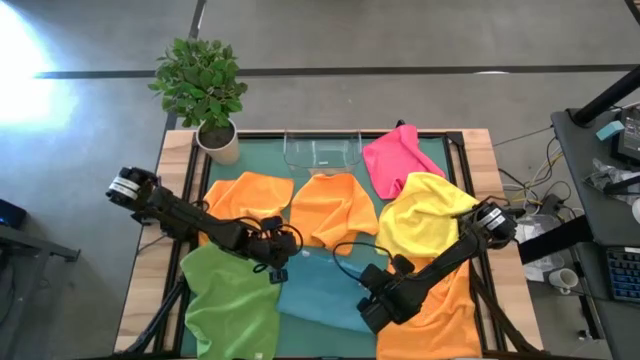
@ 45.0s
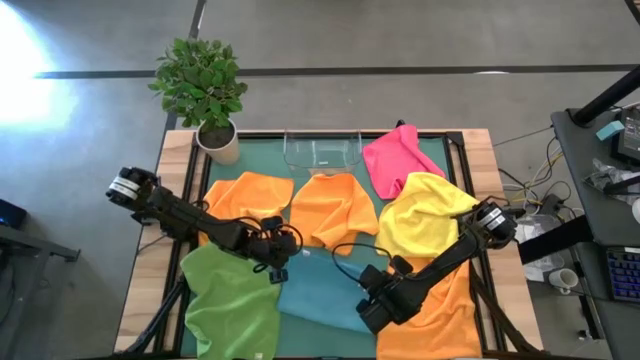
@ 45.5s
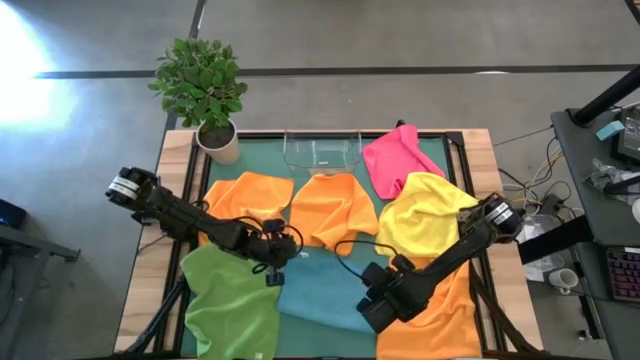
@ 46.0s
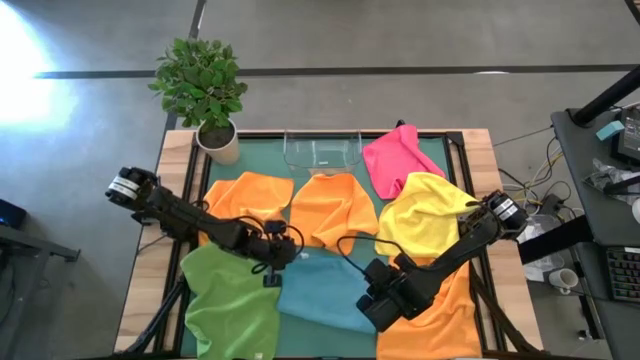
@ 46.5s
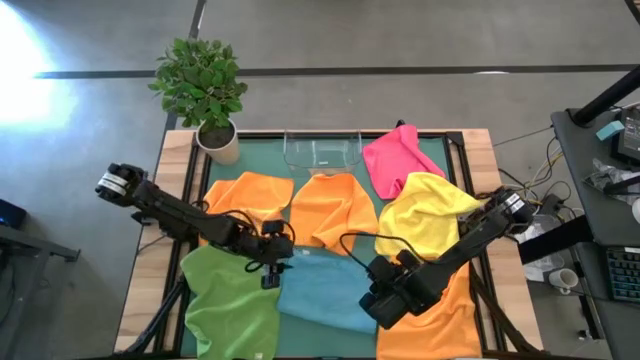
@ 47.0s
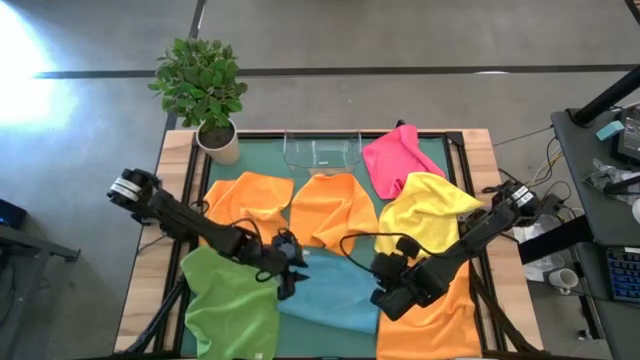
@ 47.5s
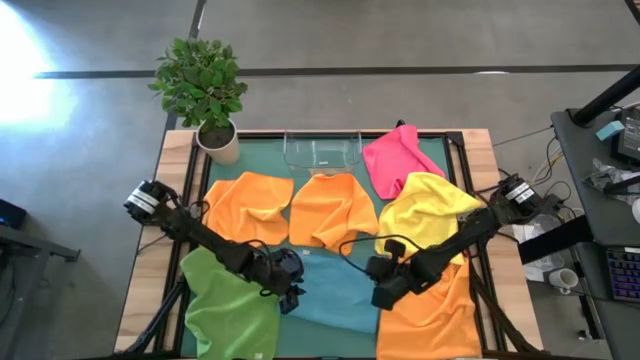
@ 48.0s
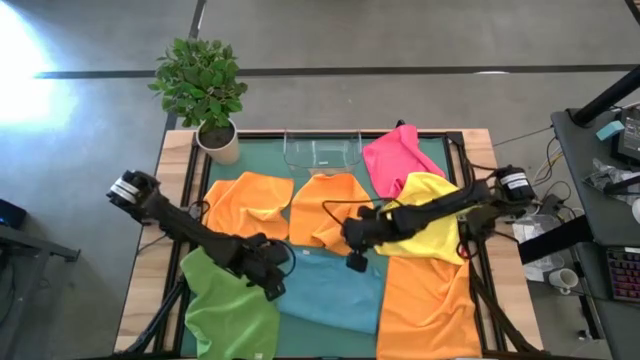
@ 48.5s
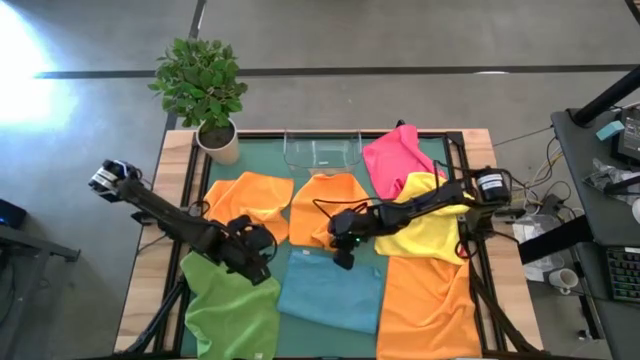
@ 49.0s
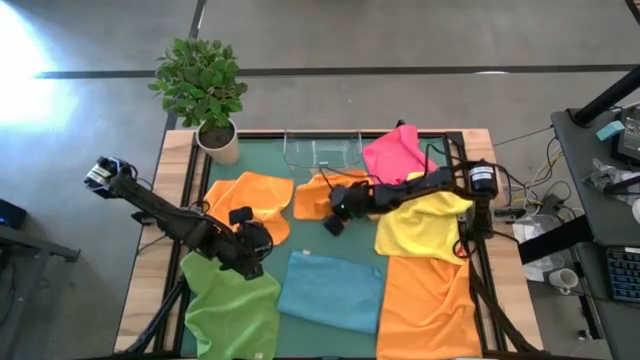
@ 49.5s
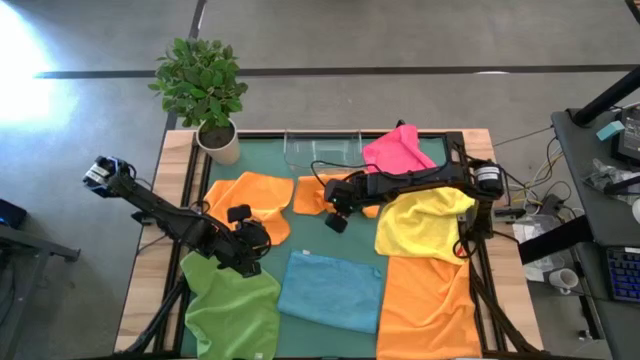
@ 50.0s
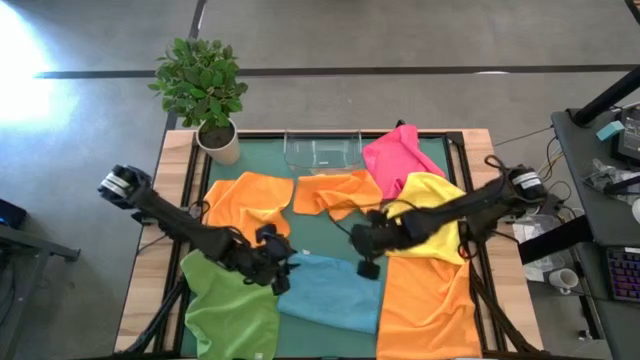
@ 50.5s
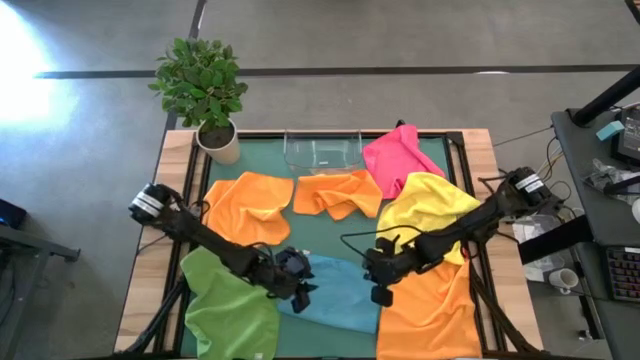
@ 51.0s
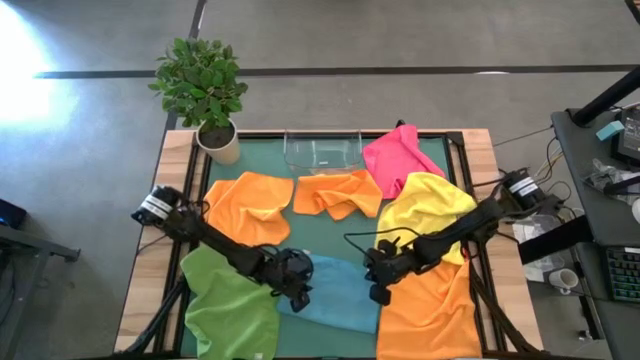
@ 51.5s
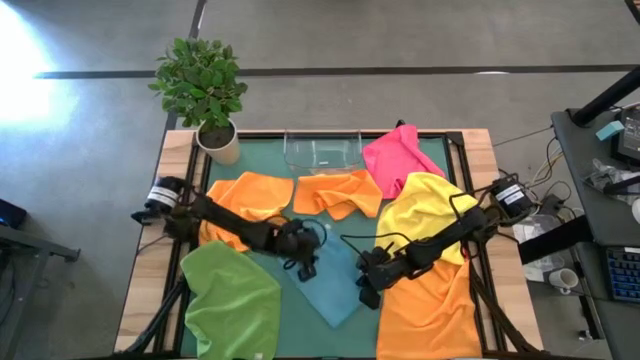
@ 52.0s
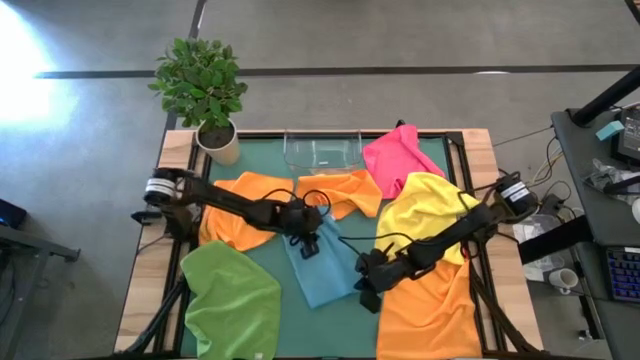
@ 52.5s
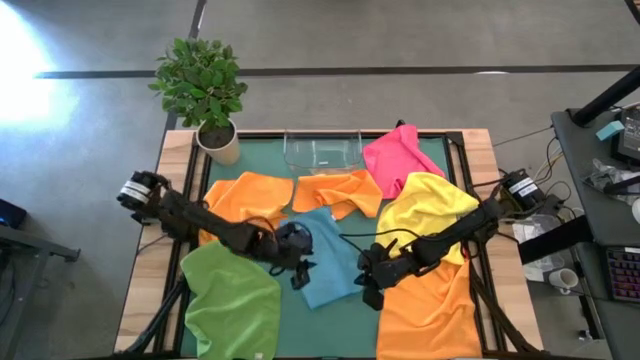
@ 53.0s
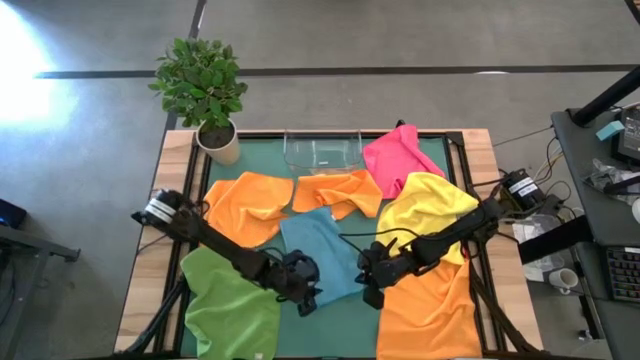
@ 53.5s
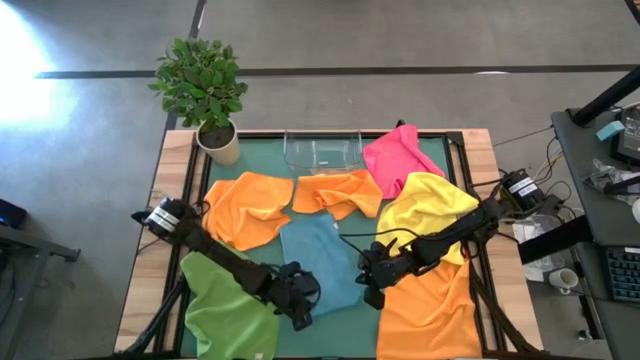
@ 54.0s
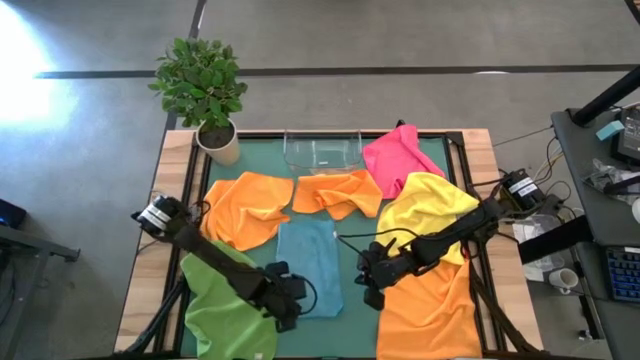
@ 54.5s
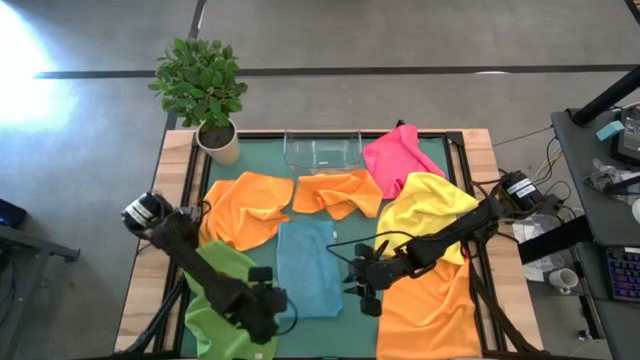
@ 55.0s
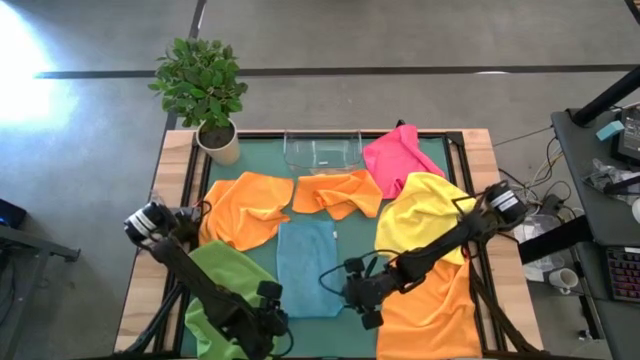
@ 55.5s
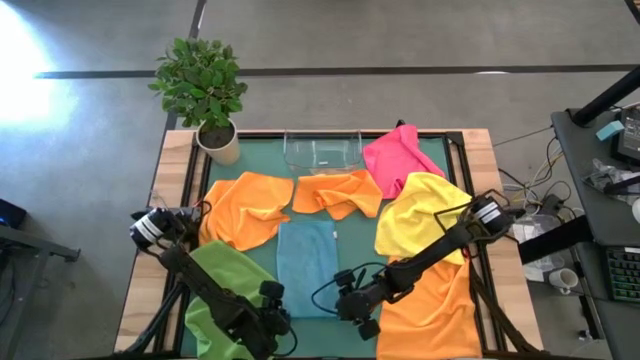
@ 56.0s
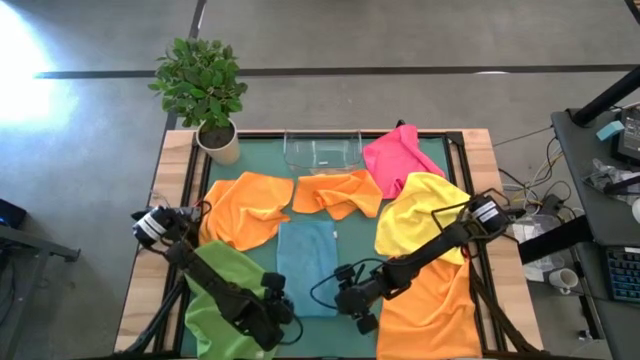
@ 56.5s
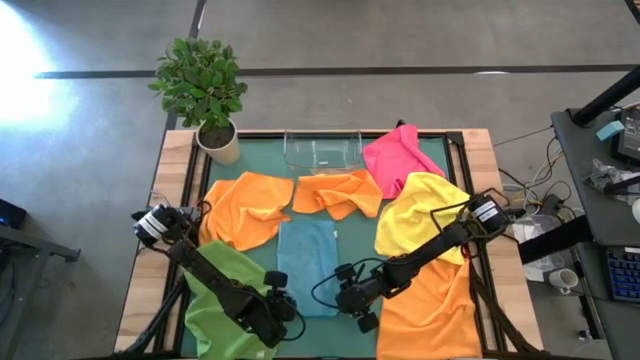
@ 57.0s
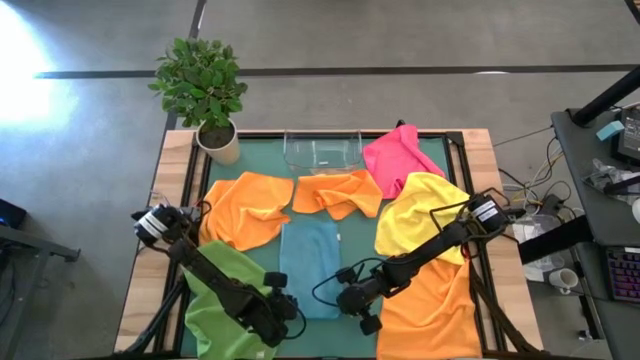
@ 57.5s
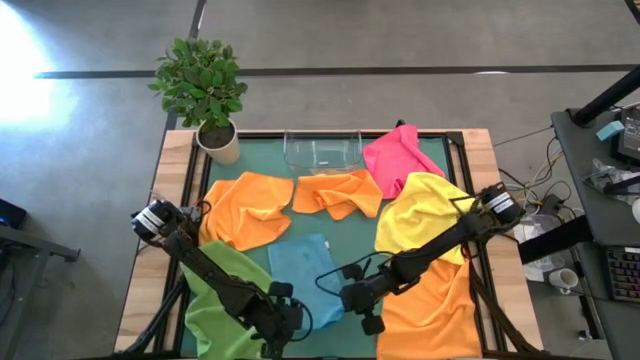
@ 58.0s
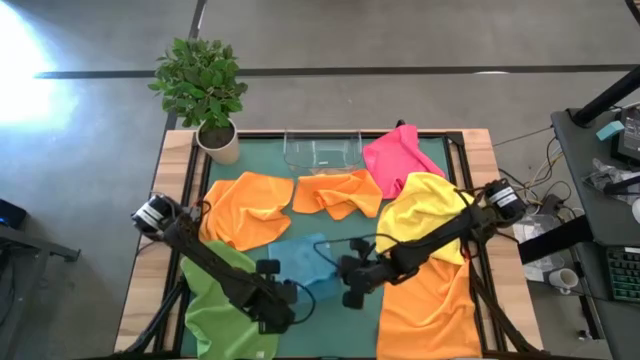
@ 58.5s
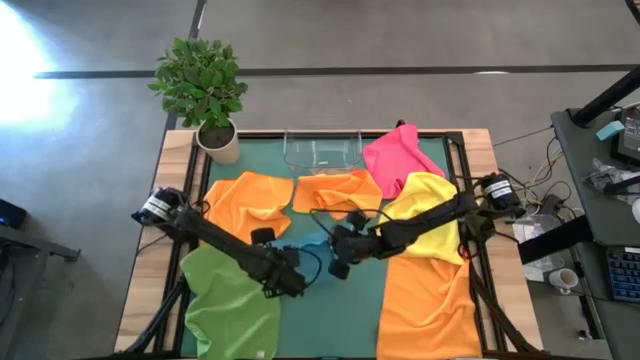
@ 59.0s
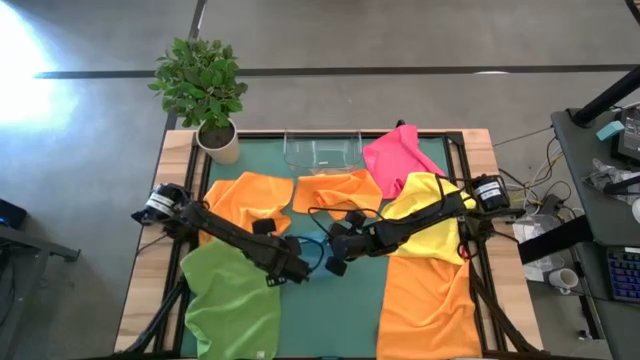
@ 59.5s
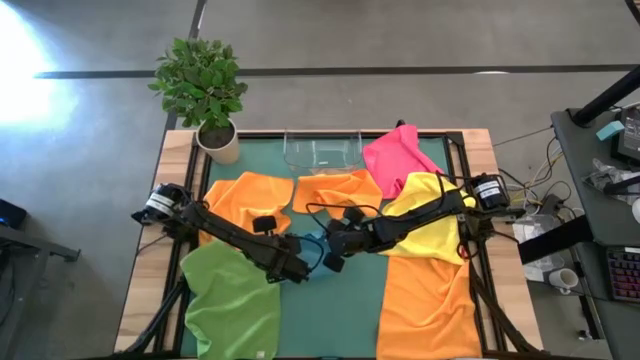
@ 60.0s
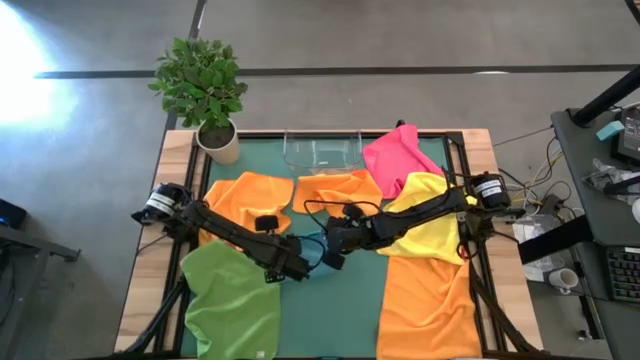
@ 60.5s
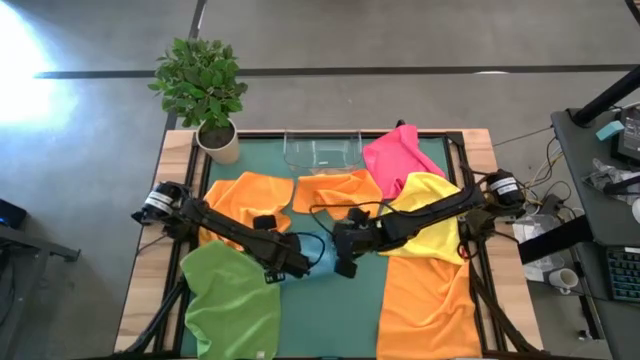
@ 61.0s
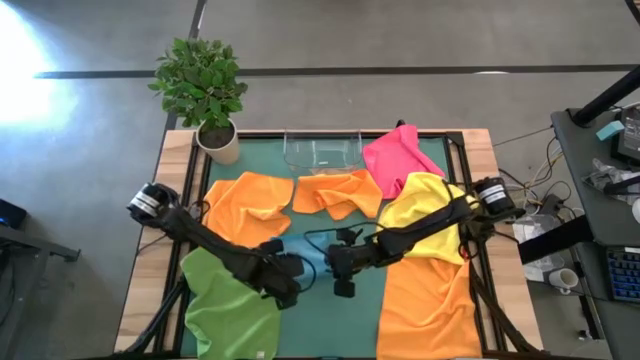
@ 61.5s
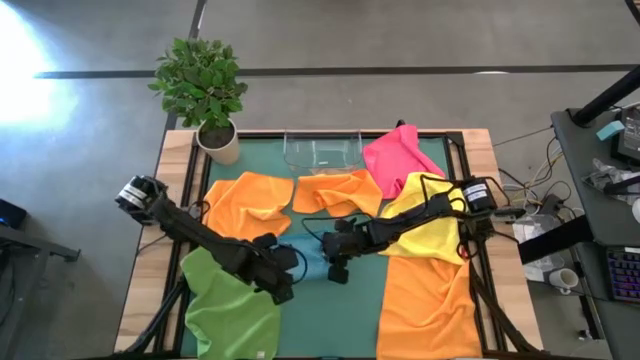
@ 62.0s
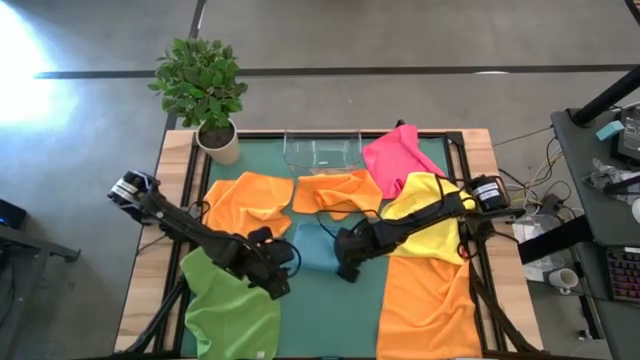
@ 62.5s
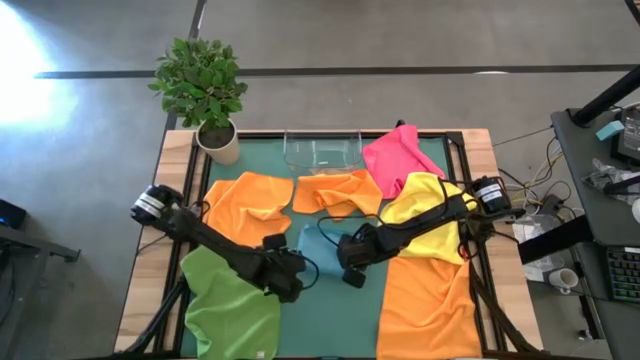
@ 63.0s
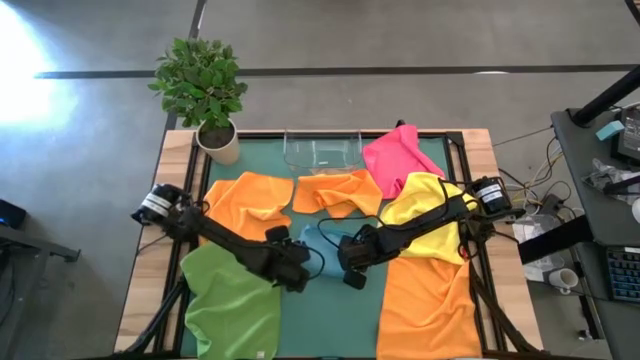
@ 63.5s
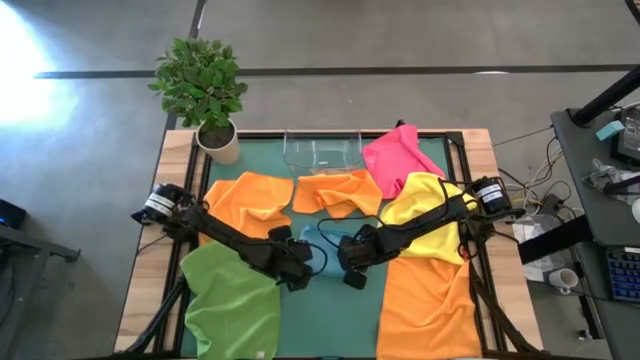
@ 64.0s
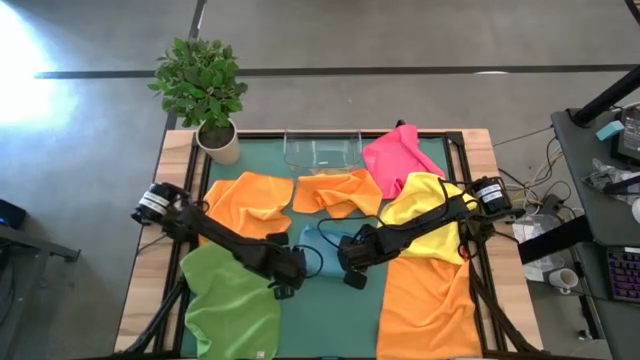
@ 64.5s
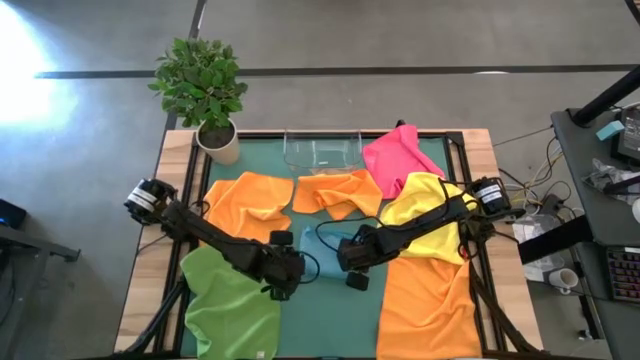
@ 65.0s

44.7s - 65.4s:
Task: Fold microfiber towels
Fold the blue microfiber towel
